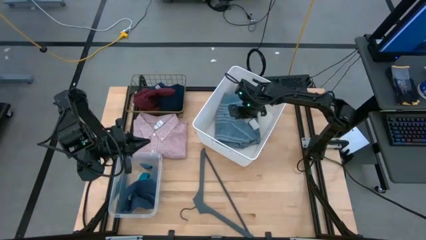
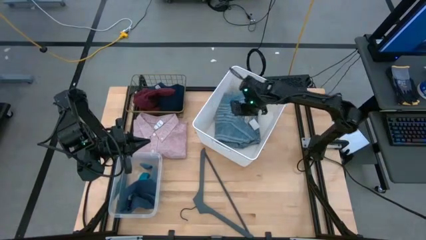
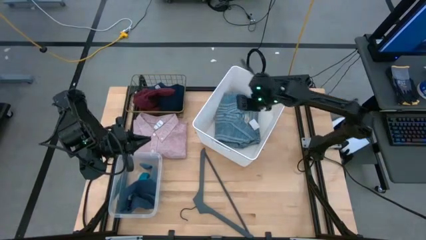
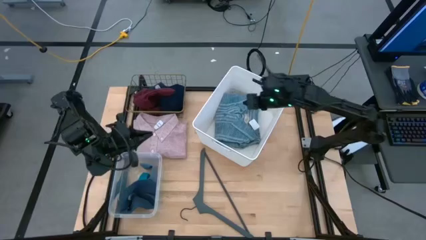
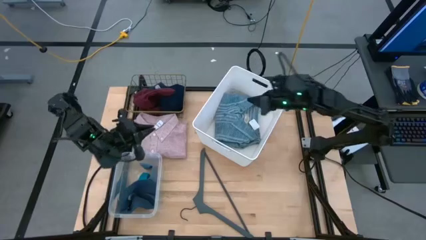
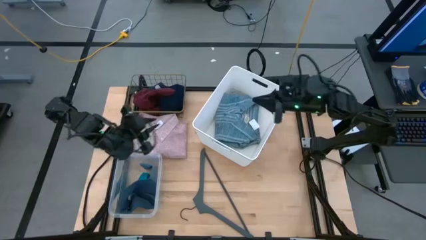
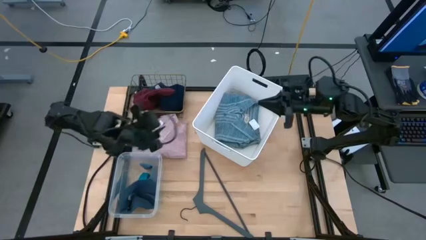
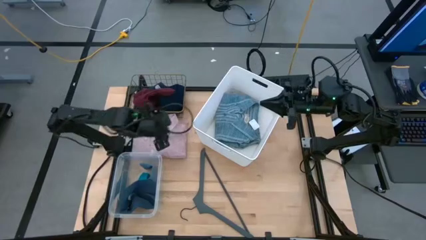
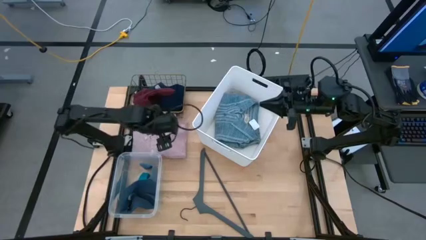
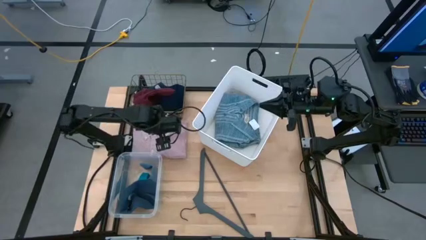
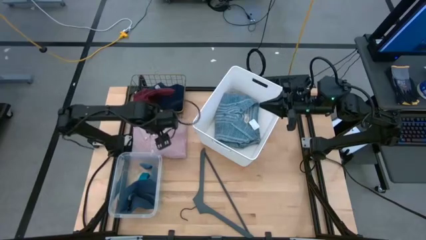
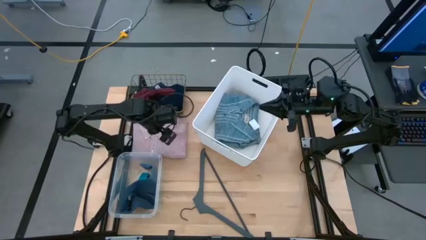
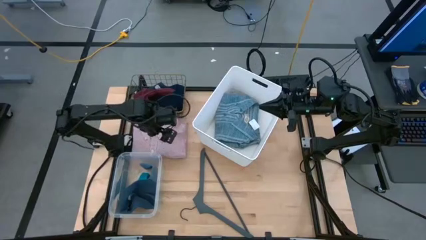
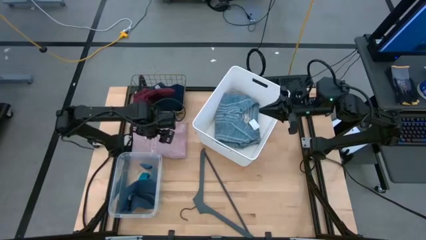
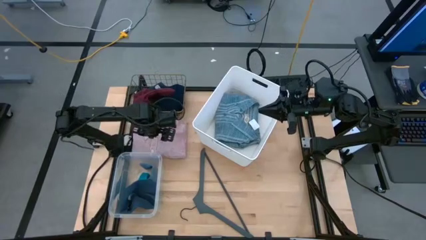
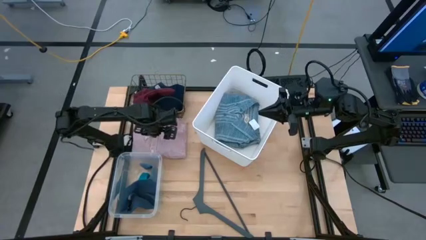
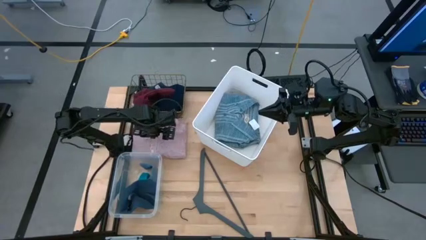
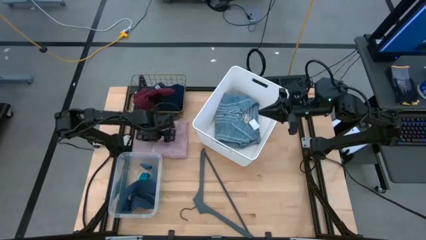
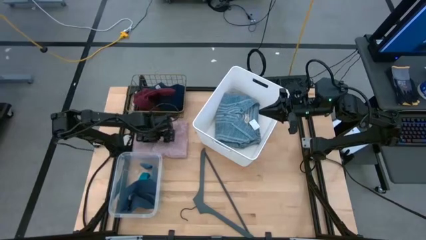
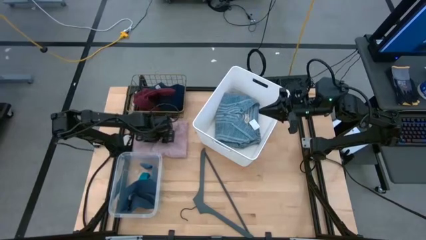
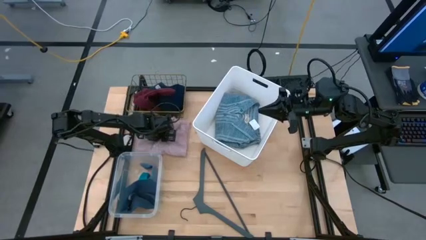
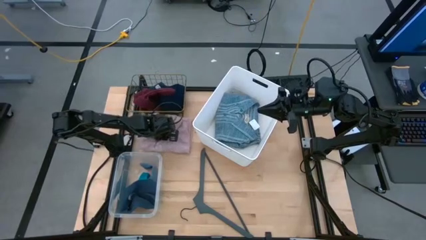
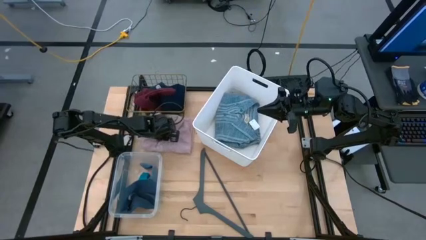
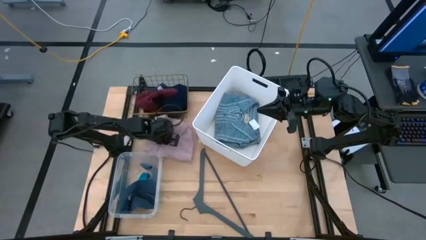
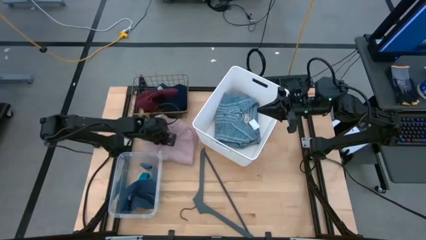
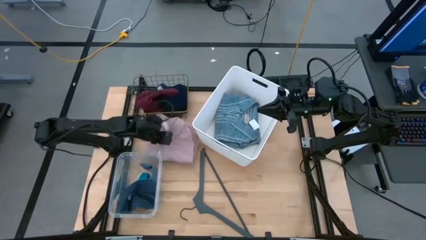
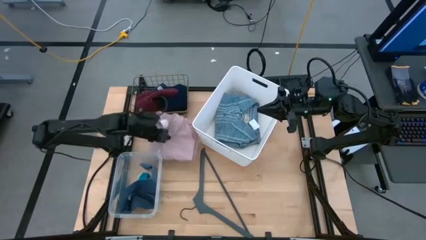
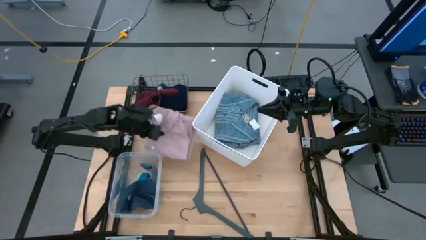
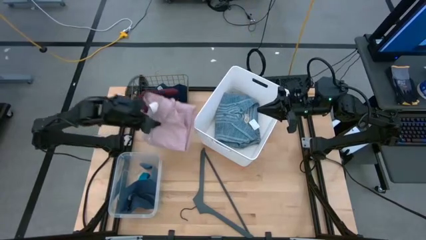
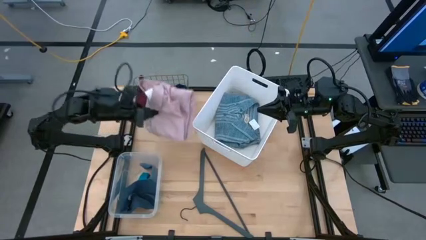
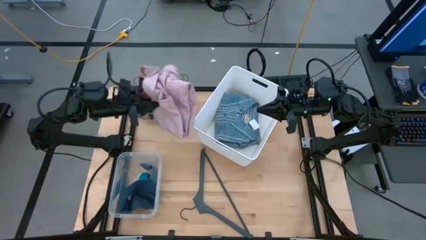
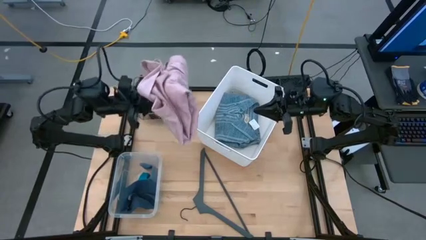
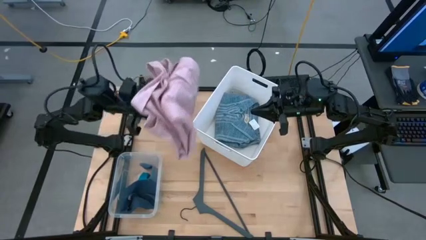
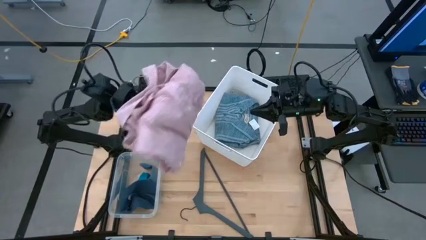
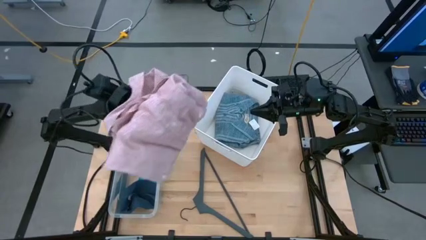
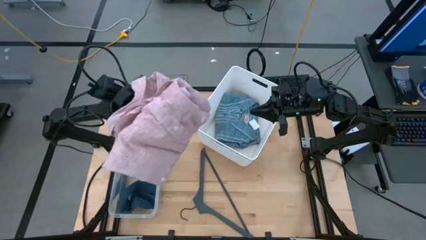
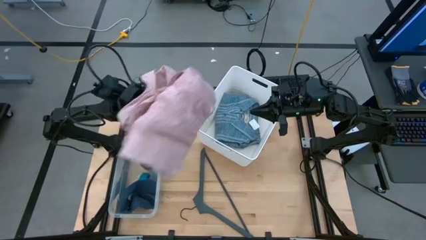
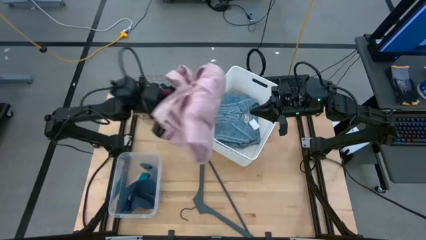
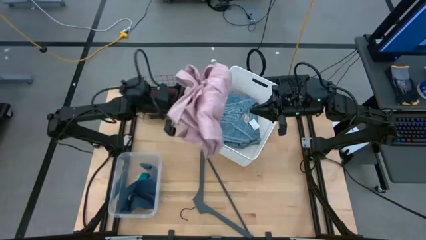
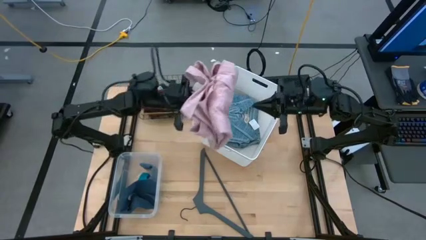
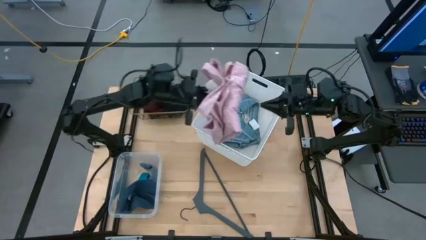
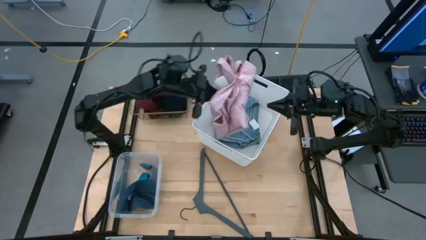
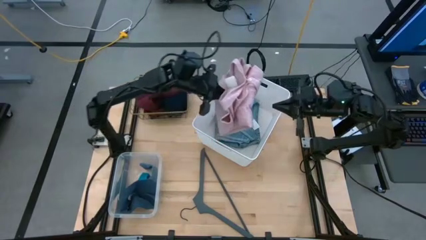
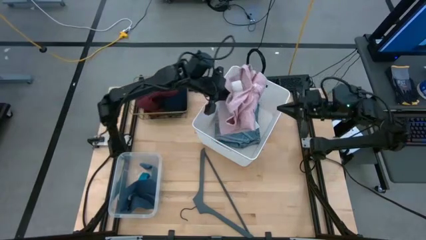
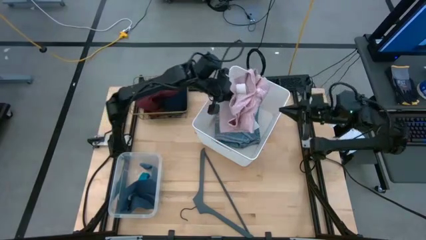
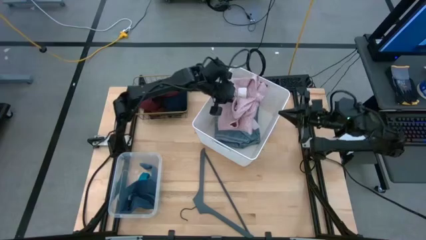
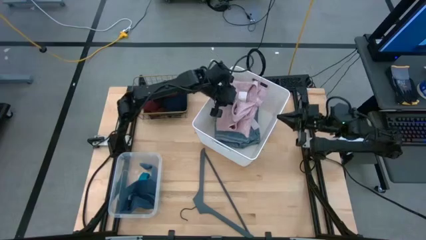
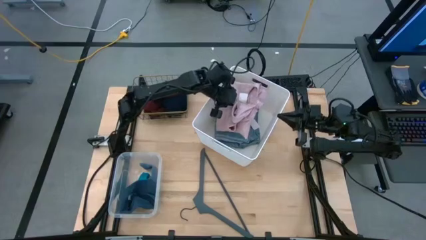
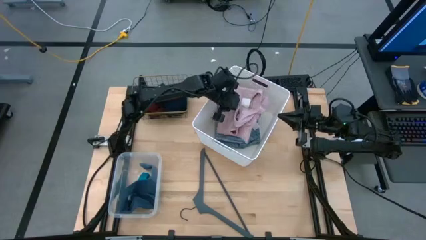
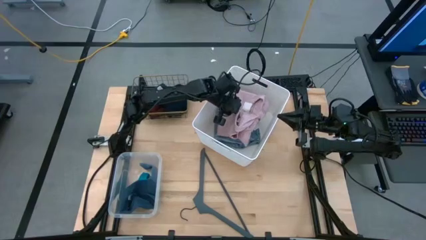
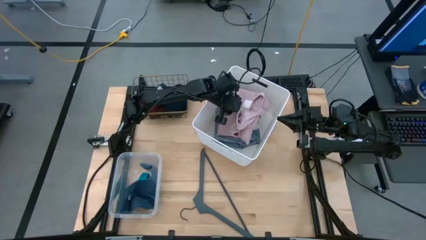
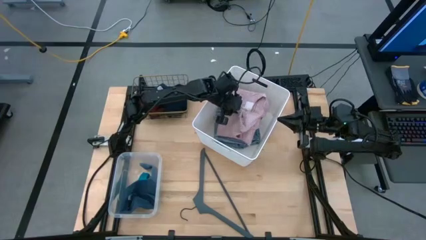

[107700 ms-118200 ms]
Task: Pick & Place Cloths
Put the pink shirt into the white bin

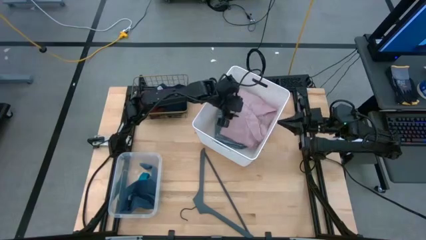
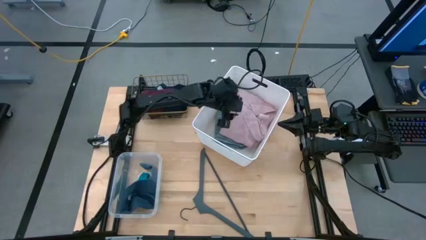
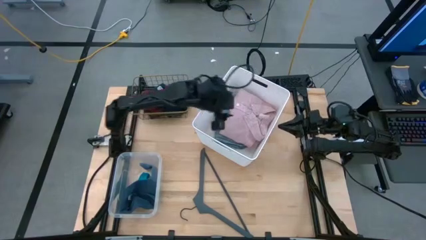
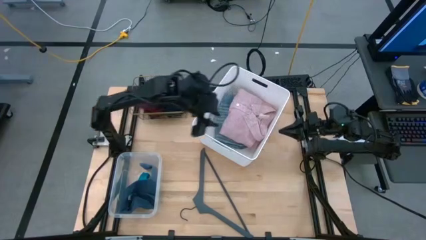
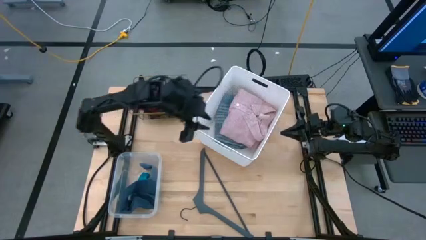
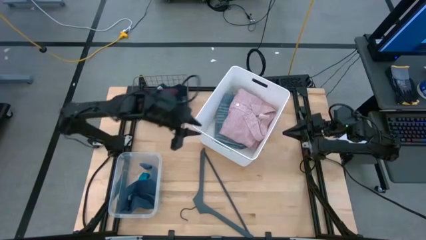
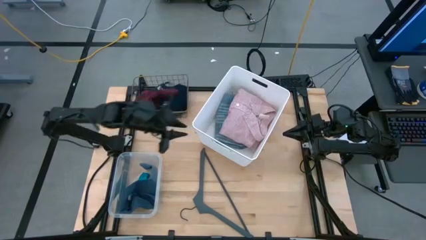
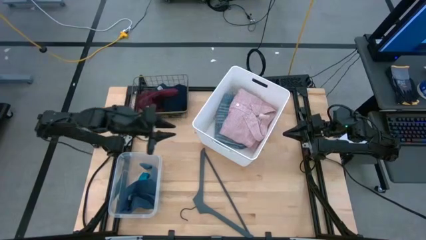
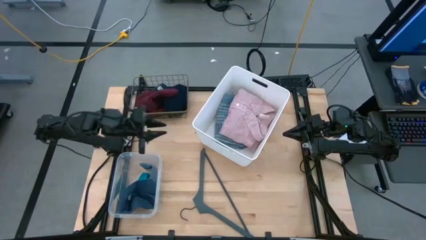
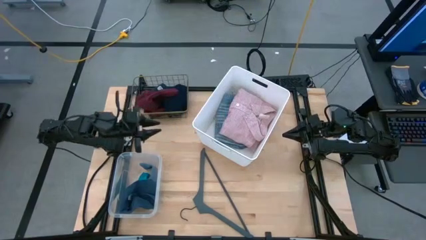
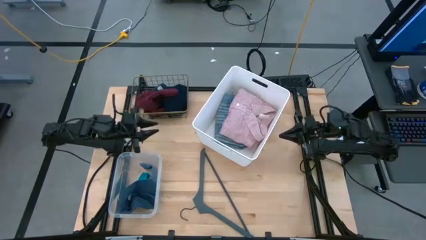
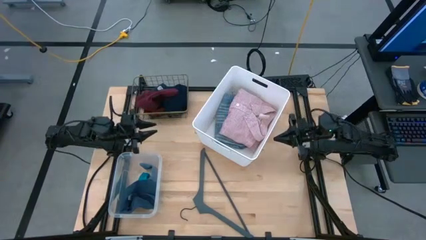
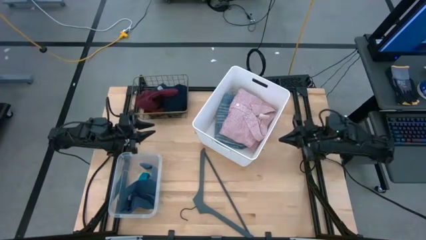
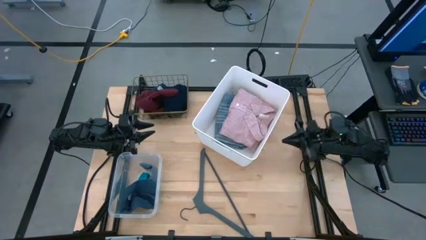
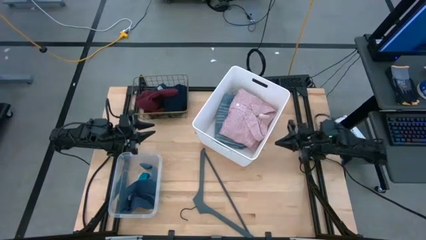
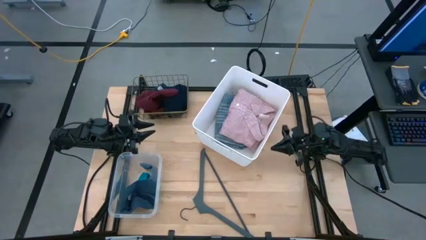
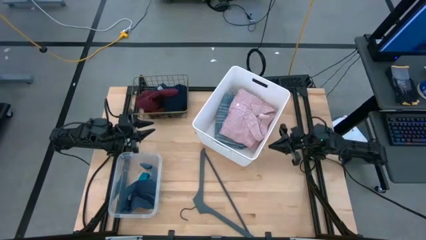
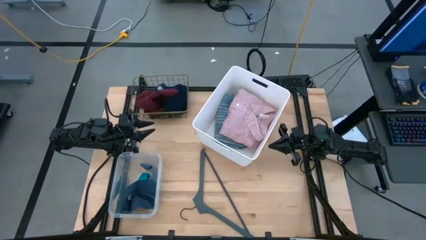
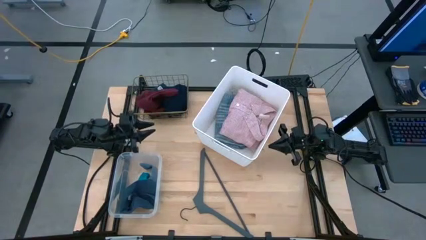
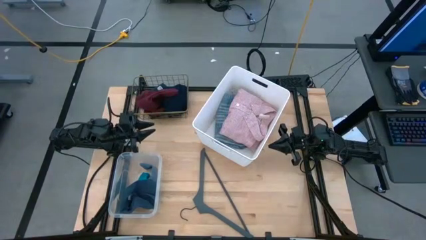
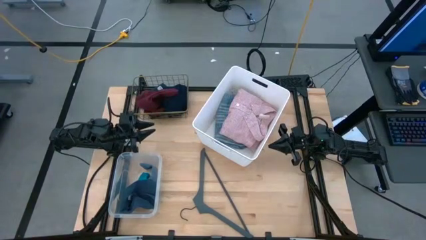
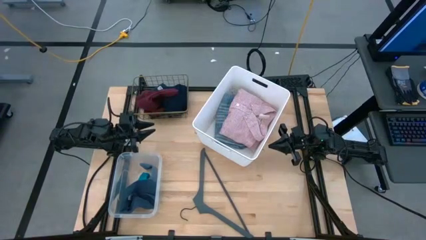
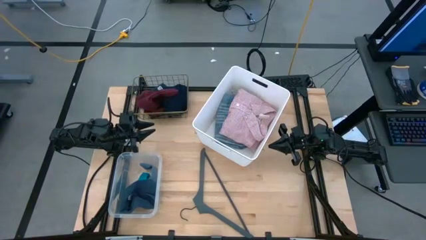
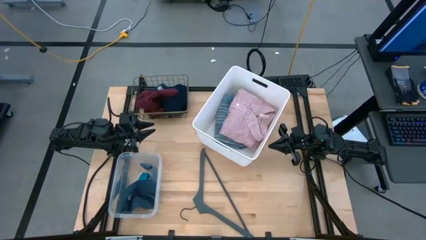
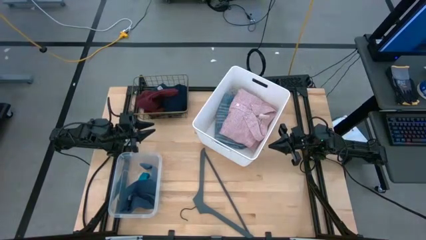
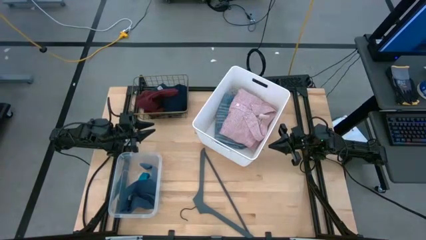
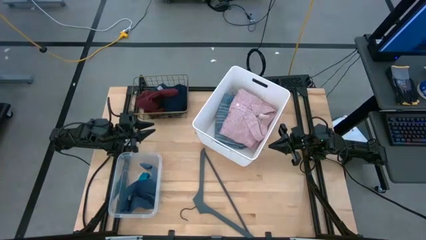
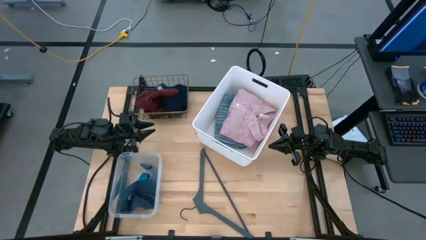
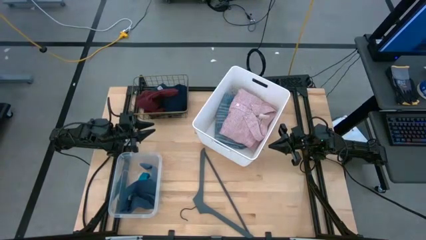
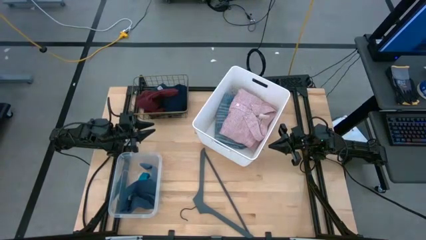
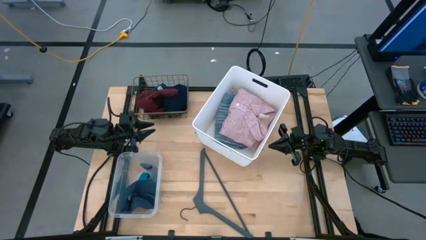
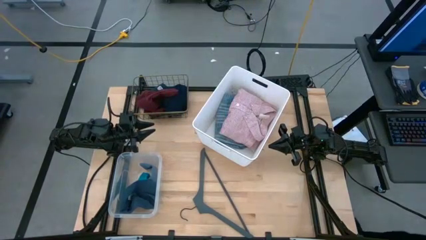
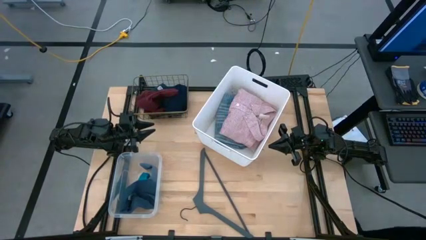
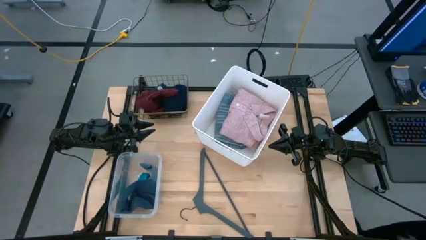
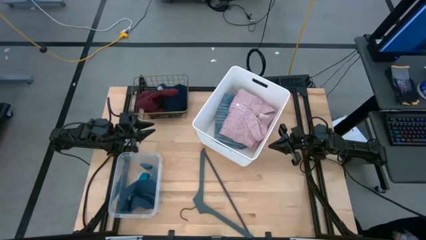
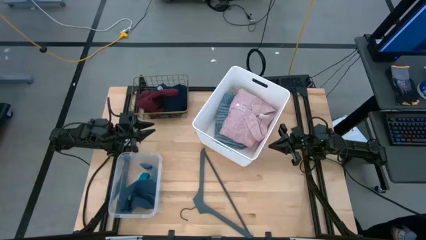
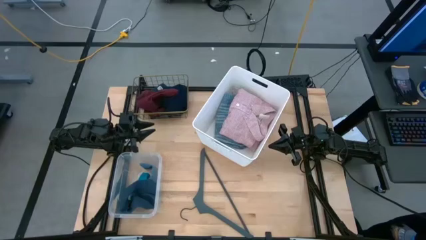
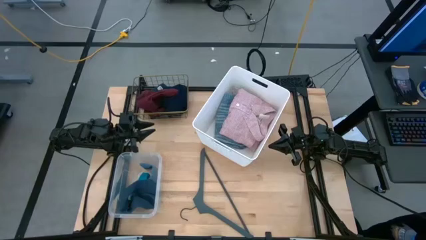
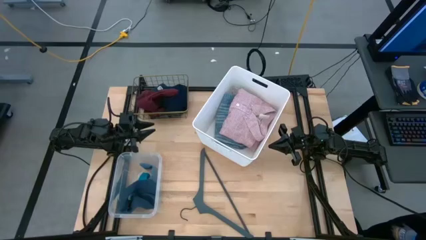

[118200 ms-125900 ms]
Return to Home Position
